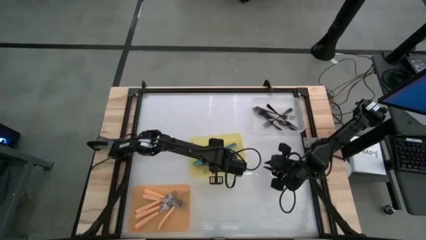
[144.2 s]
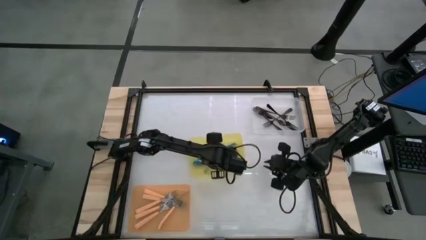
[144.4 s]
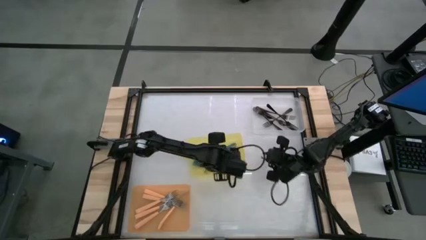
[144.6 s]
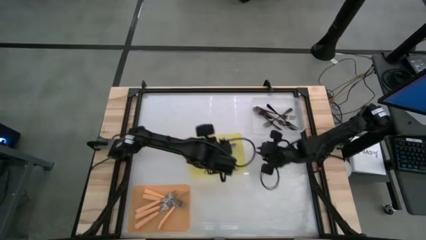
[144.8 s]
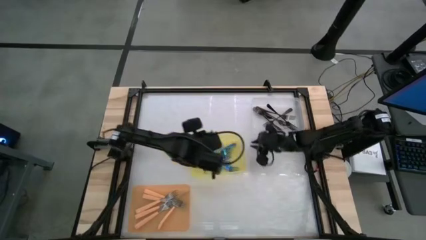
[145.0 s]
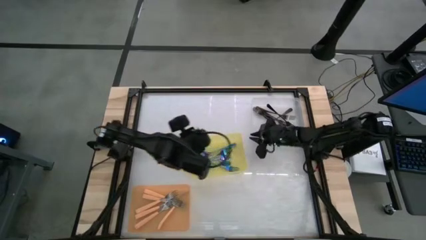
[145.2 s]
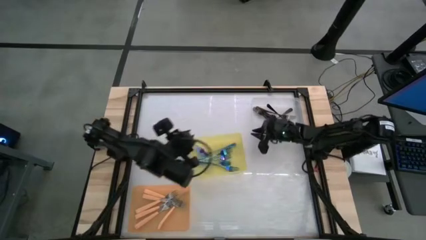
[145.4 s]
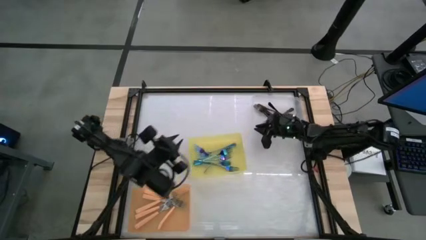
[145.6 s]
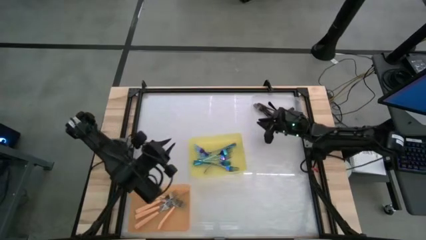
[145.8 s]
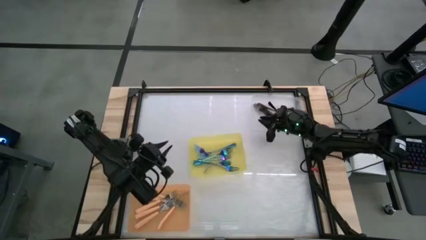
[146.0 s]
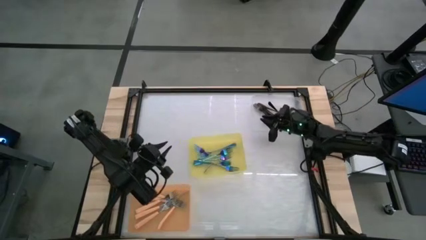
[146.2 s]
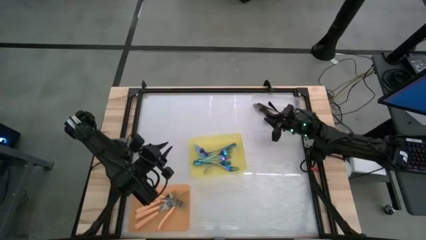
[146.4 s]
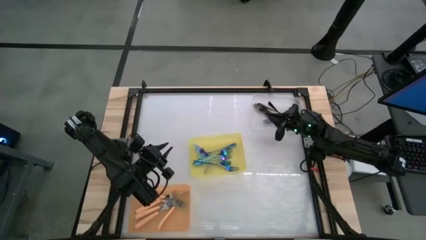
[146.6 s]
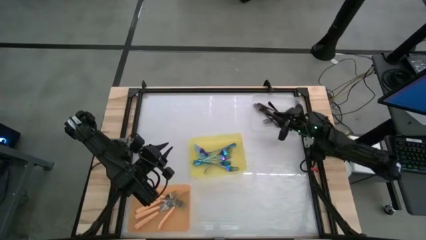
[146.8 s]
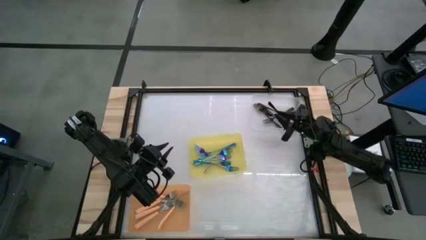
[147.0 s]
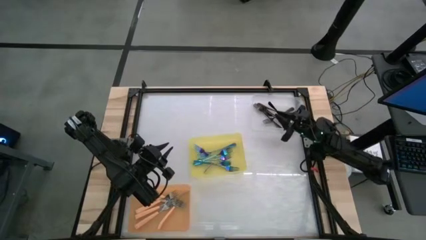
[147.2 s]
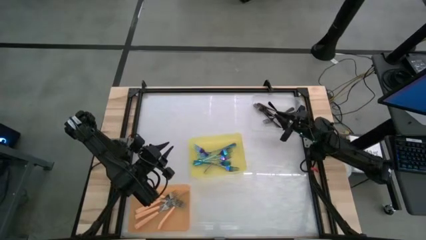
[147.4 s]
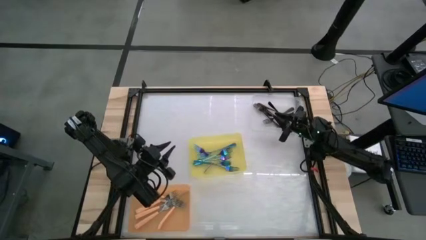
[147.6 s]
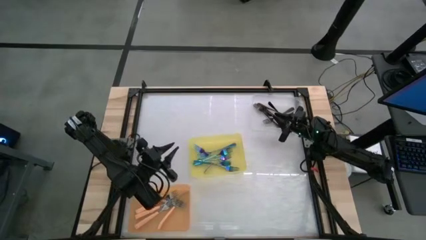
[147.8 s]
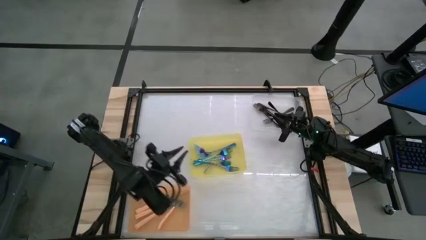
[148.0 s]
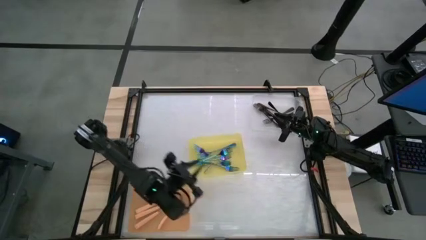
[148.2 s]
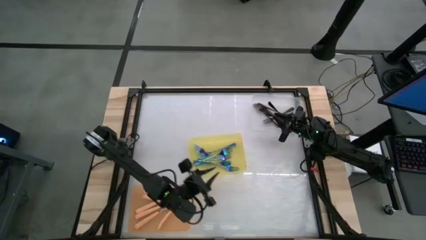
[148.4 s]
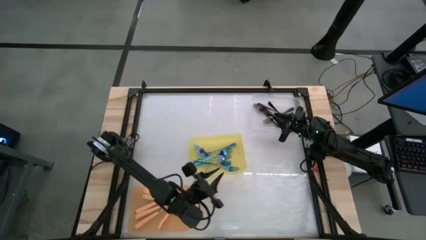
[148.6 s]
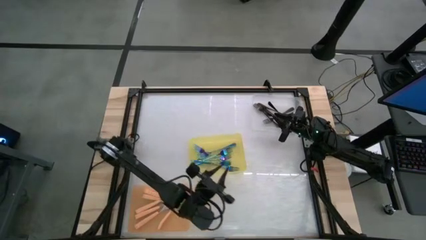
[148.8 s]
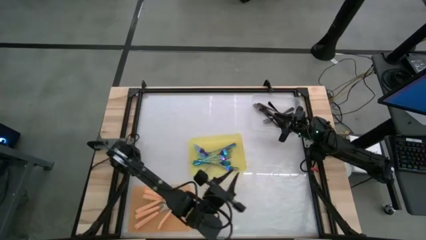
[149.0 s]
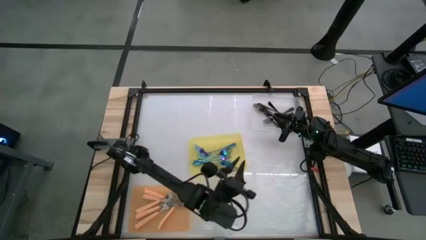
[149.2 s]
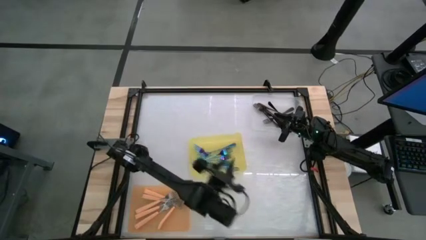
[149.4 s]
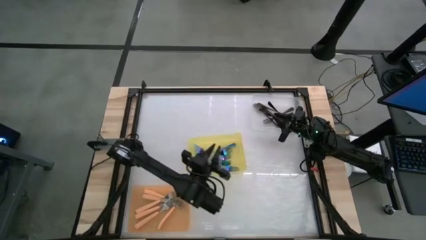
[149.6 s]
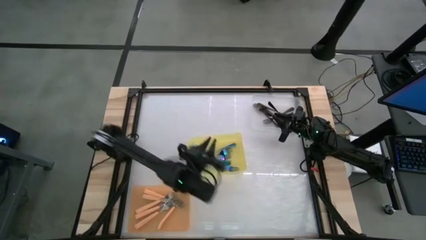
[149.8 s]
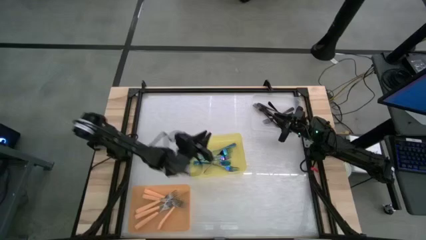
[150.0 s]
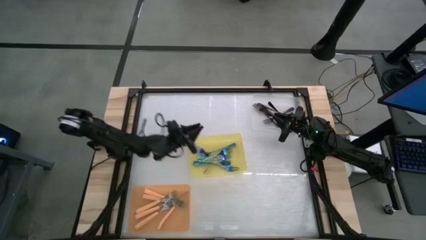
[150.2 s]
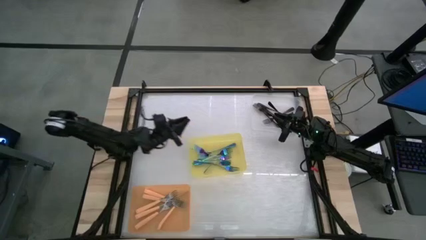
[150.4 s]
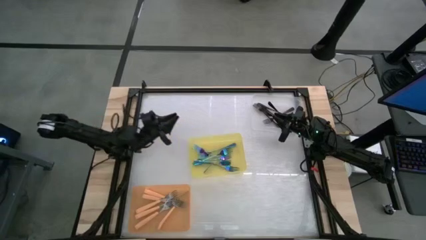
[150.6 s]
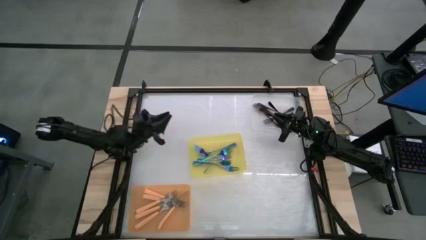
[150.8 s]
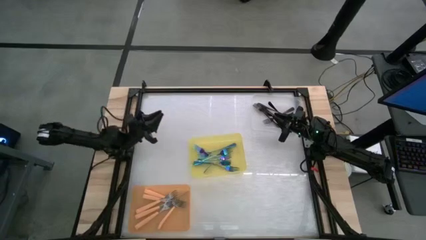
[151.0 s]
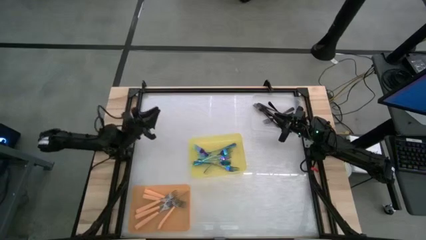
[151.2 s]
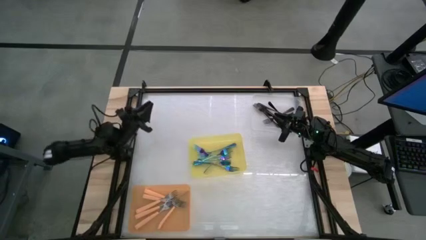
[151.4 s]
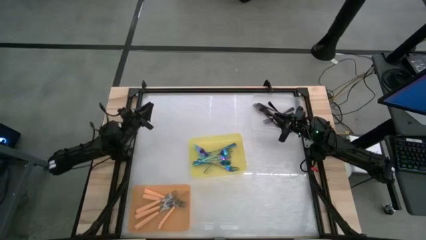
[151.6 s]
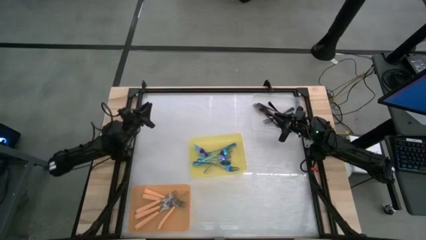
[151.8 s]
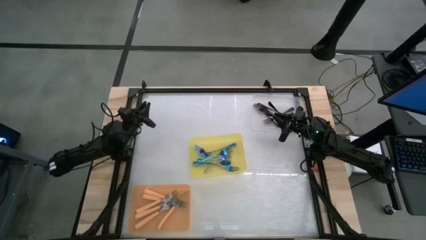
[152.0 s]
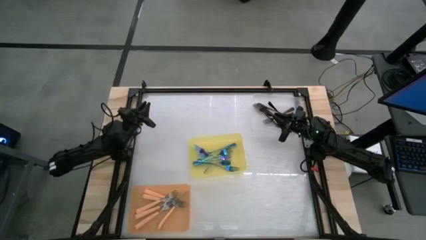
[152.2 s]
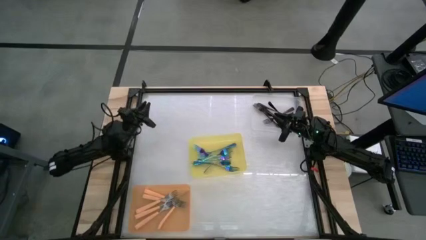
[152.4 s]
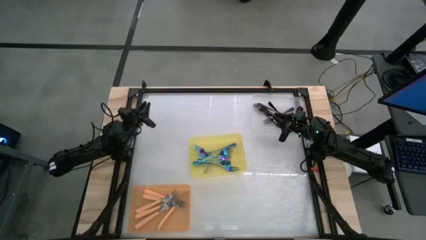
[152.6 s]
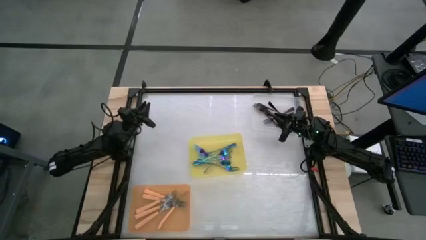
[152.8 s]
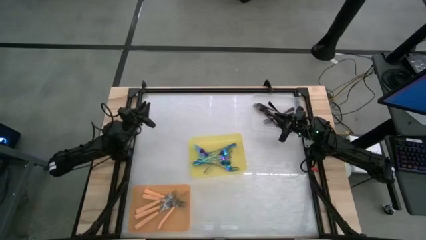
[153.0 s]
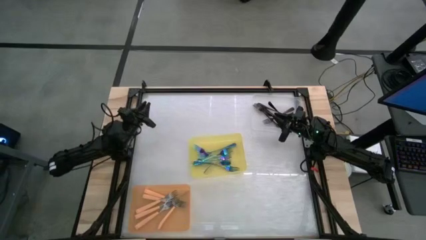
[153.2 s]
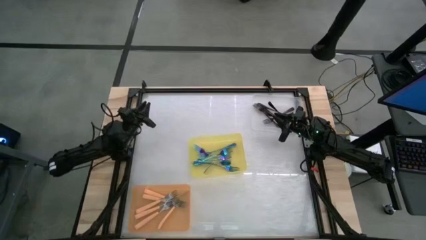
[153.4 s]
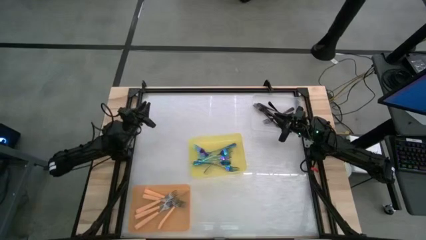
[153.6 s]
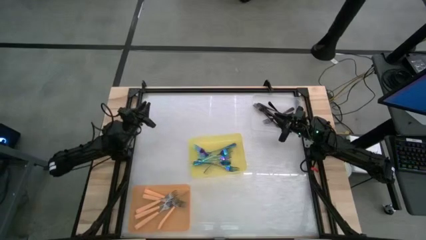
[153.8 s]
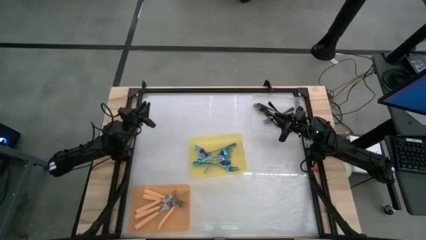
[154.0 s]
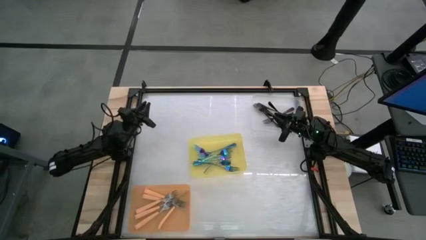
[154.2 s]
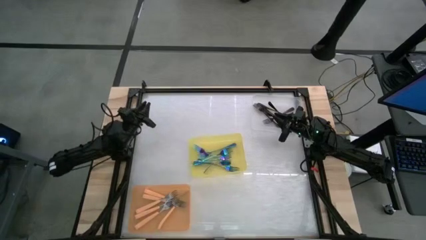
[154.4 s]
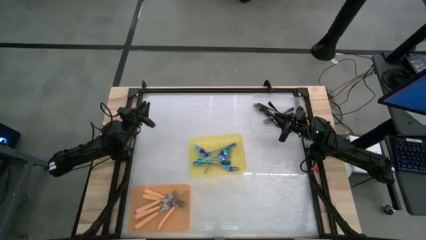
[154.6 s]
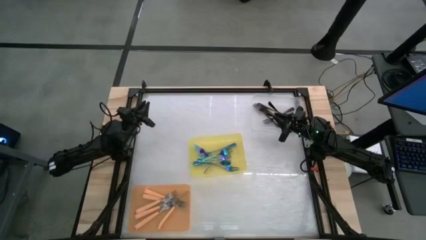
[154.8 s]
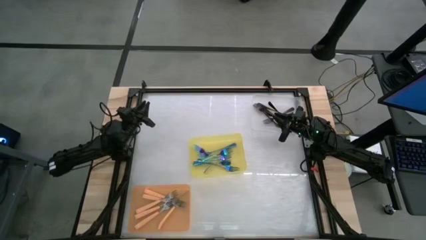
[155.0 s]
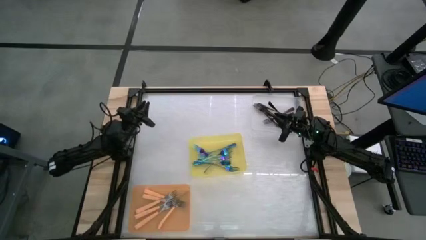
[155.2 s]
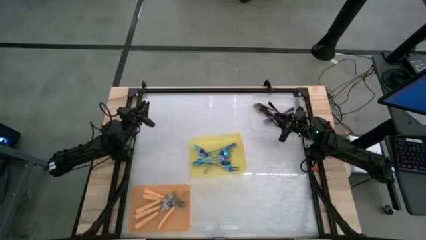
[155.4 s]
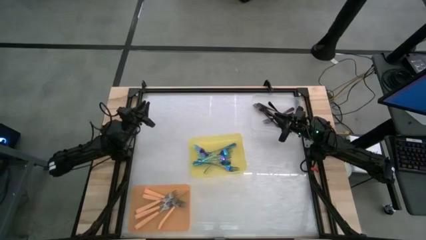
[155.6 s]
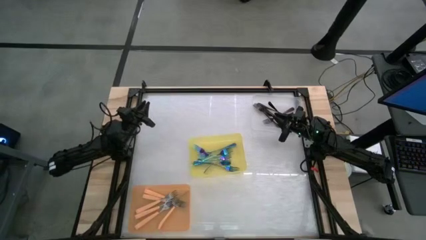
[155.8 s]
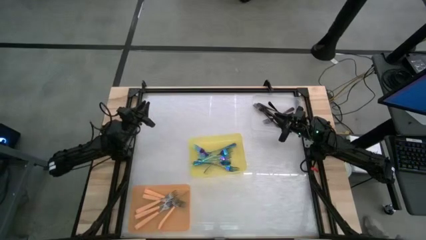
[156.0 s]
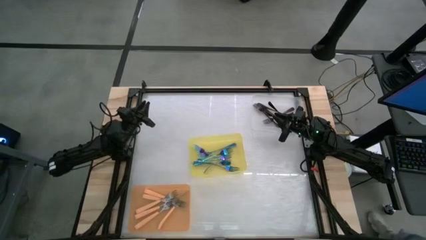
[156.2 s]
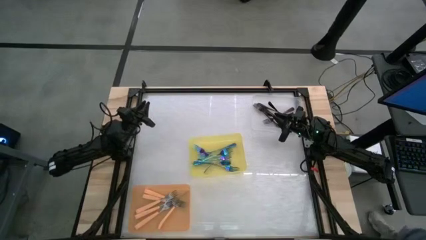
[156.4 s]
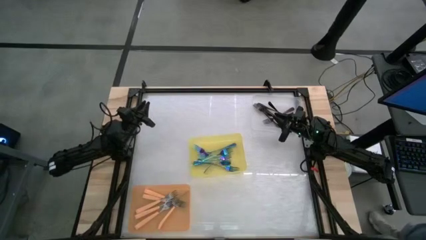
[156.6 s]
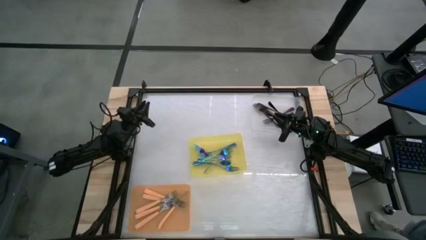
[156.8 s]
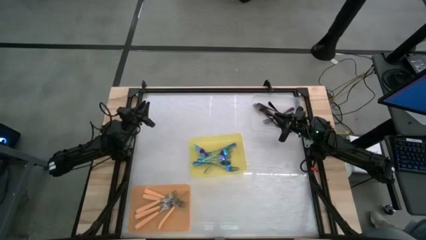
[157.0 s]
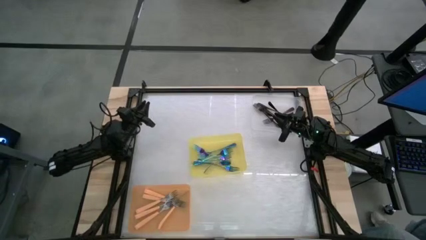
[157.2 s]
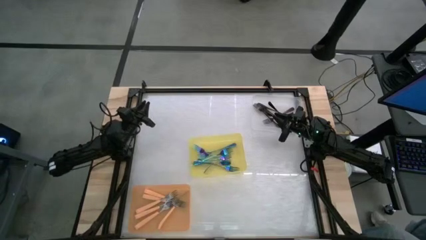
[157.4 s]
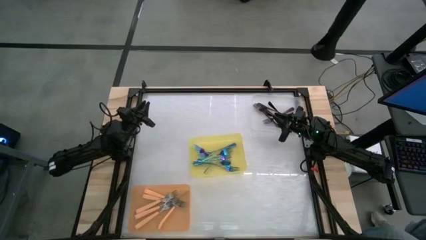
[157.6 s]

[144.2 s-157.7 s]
Task: Sort silverware by color (type)
Return to Home Position

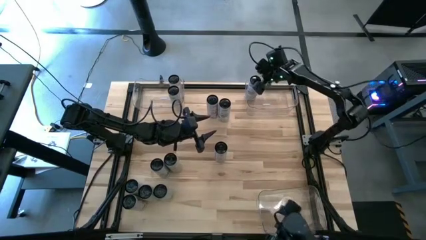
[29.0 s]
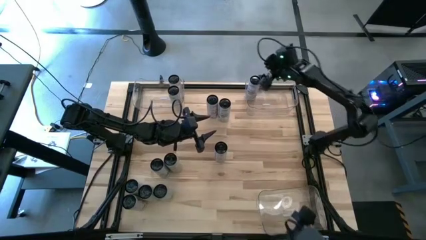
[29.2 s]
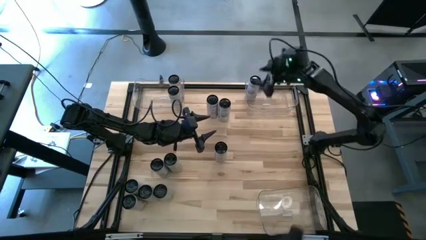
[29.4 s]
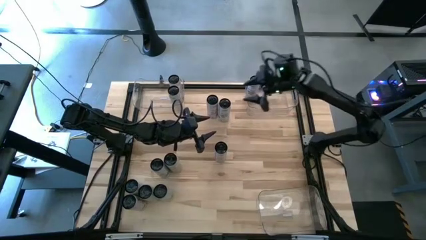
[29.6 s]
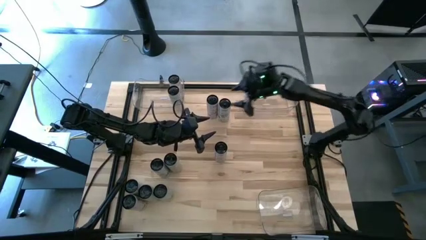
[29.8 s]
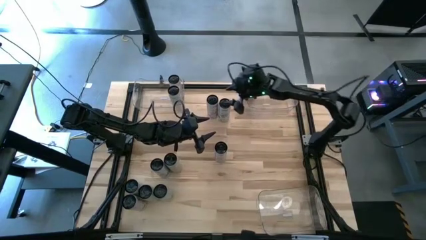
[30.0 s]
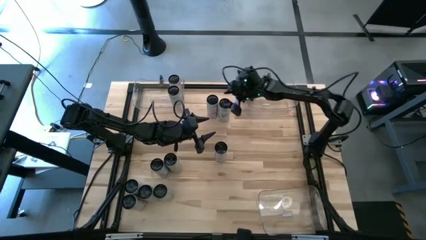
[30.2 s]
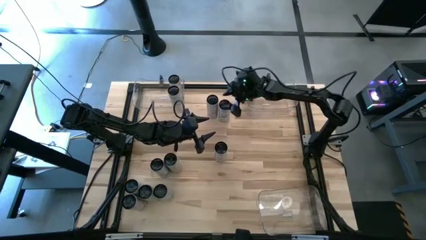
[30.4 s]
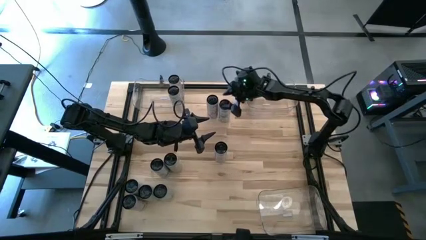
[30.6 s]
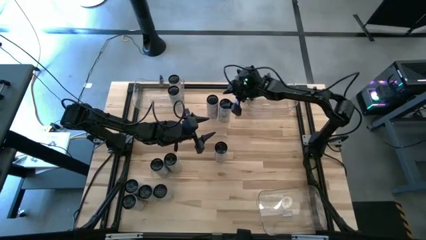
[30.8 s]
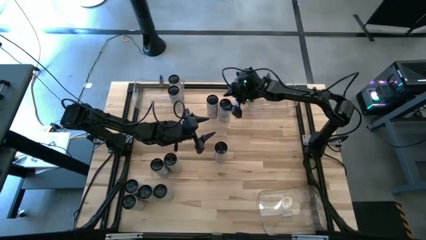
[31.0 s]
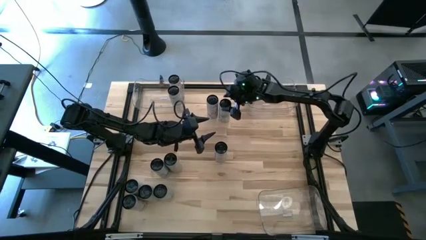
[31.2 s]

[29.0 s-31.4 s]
Task: Sort soda cans
Put the white-blue soda can into the top right transparent bin

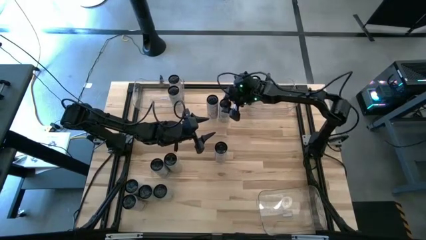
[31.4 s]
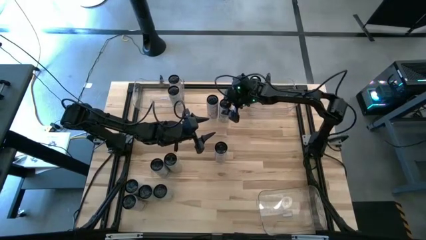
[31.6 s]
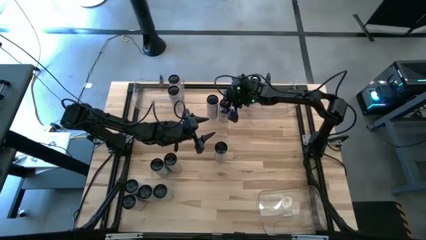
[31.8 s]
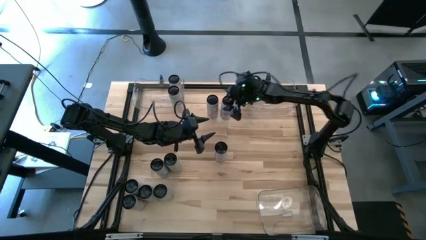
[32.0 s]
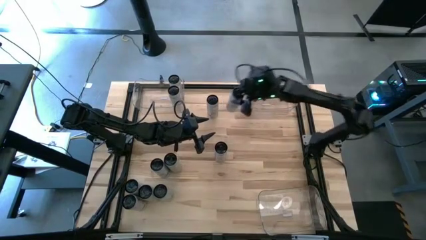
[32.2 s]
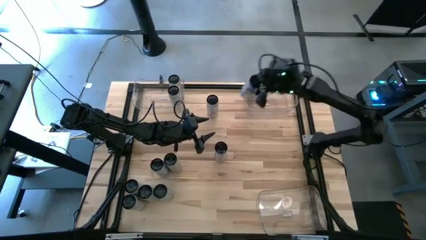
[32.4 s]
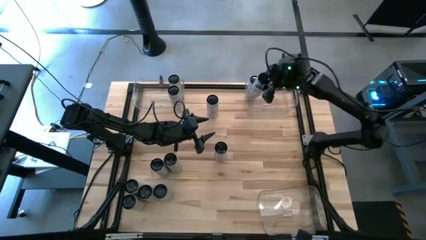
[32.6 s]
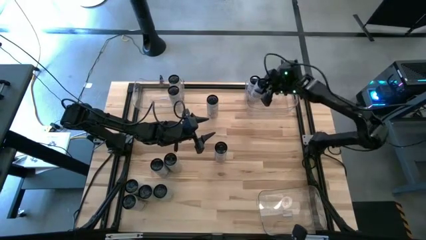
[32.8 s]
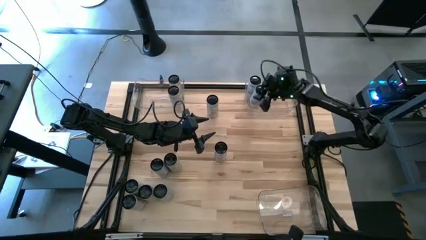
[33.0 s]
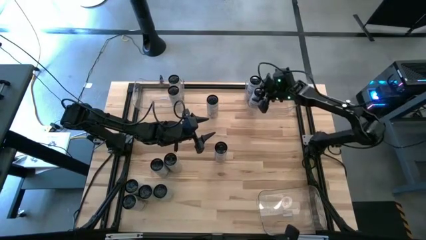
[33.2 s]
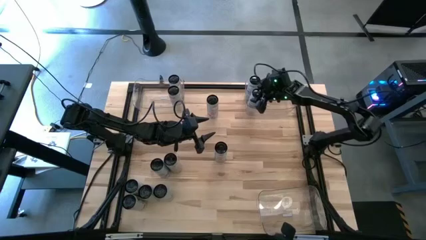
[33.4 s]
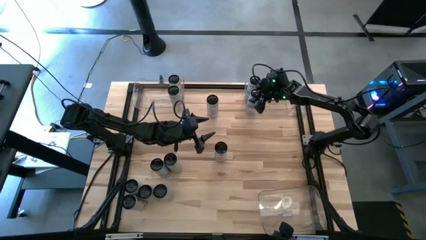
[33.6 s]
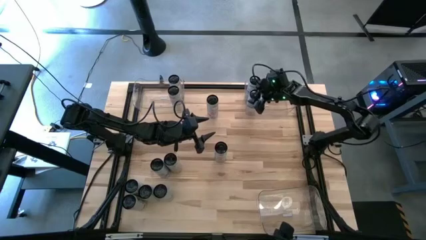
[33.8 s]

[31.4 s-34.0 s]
Put the white-blue soda can into the top right transparent bin
